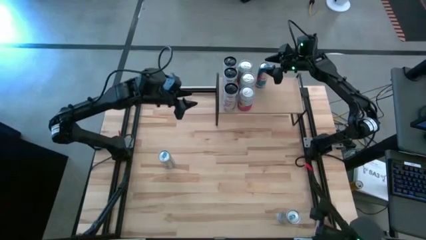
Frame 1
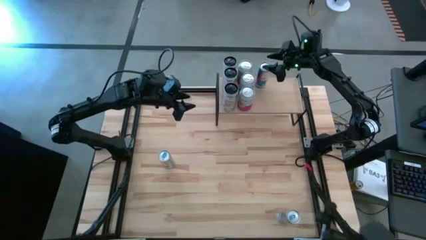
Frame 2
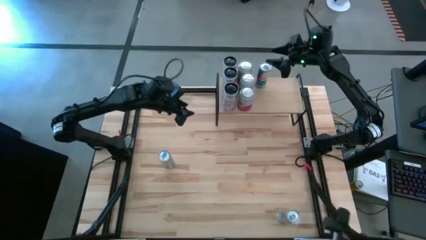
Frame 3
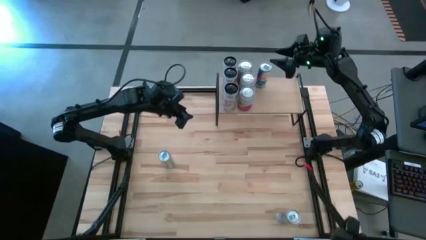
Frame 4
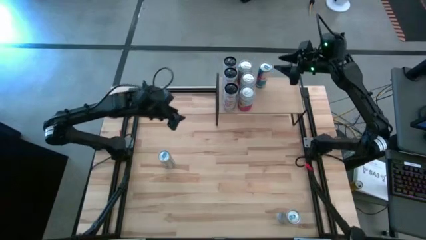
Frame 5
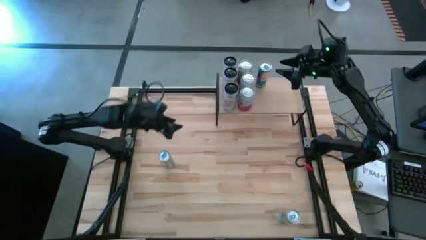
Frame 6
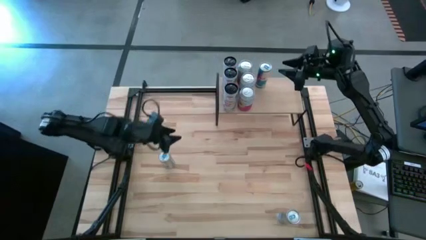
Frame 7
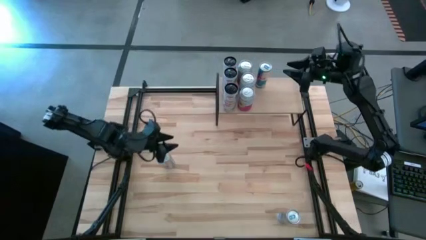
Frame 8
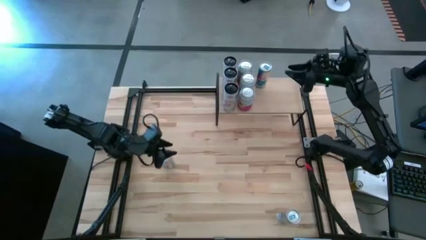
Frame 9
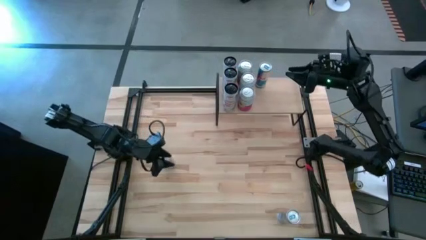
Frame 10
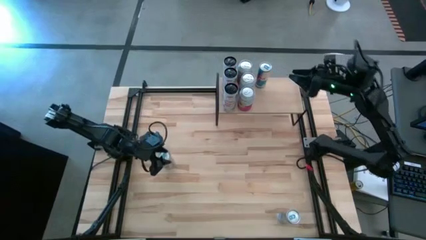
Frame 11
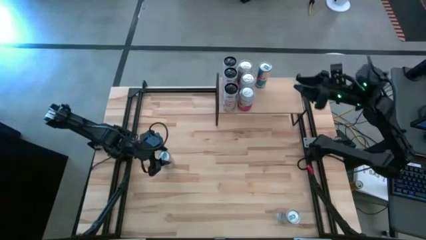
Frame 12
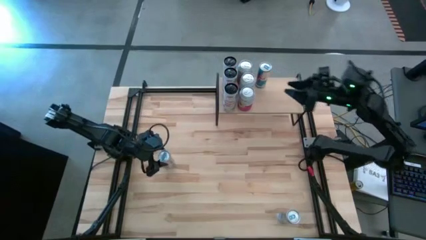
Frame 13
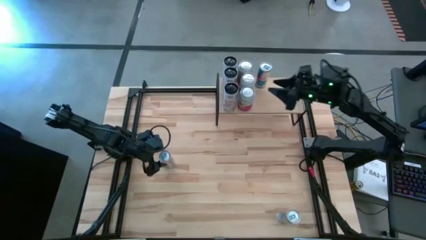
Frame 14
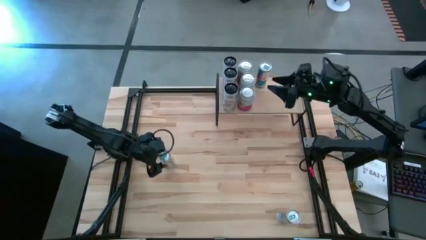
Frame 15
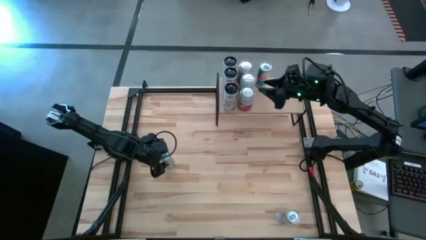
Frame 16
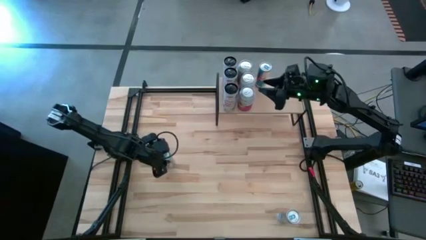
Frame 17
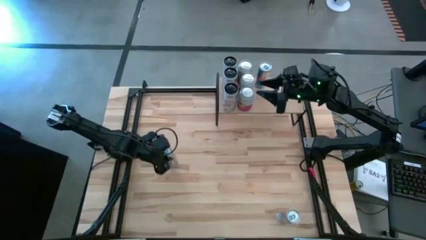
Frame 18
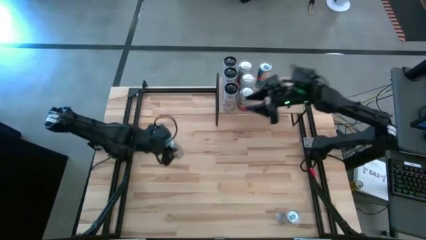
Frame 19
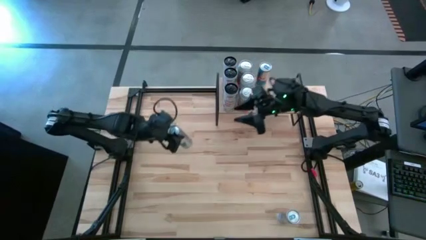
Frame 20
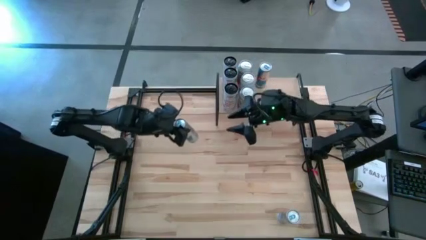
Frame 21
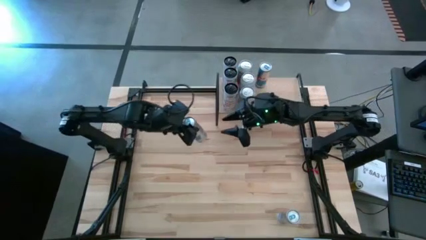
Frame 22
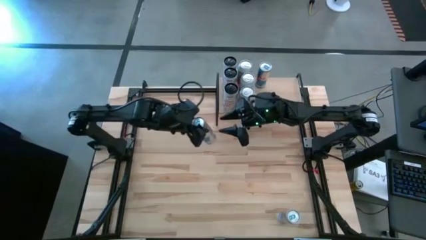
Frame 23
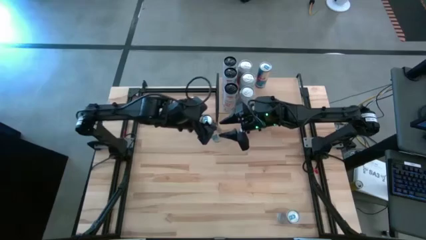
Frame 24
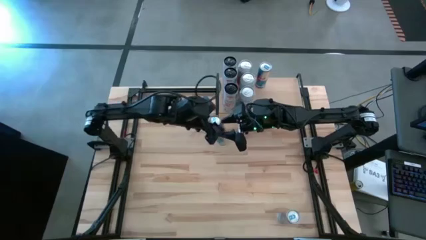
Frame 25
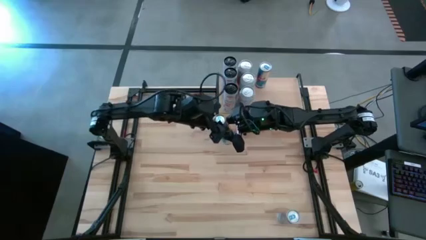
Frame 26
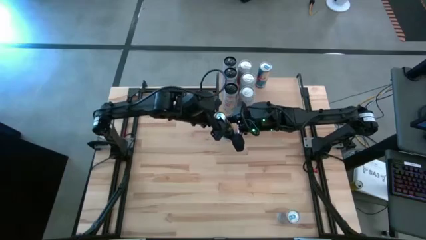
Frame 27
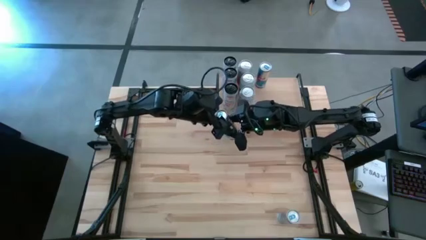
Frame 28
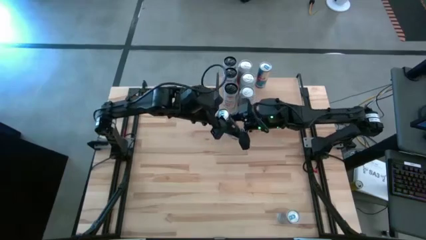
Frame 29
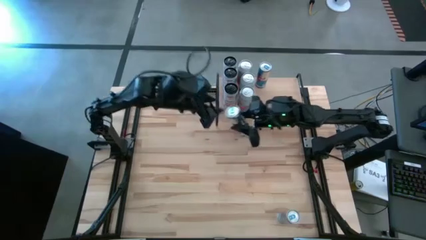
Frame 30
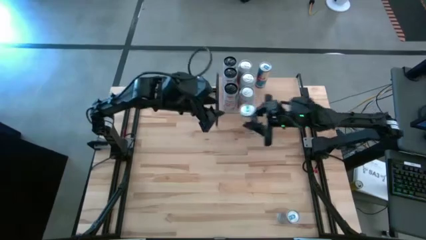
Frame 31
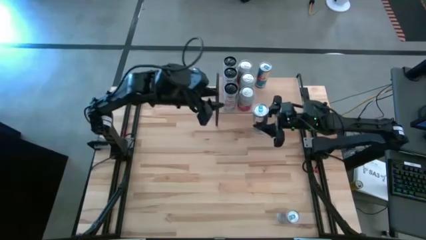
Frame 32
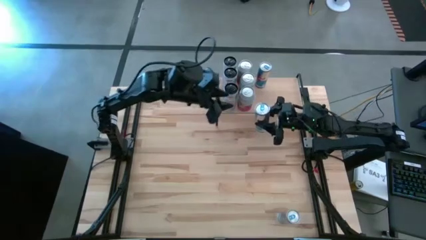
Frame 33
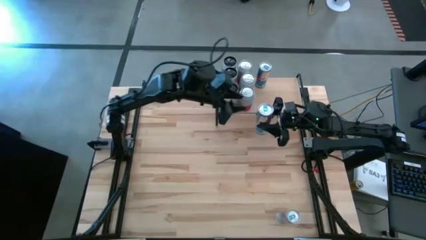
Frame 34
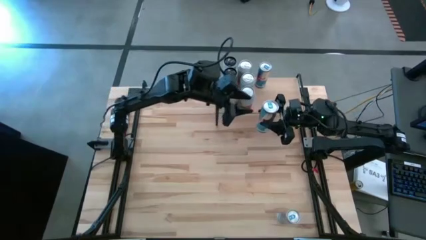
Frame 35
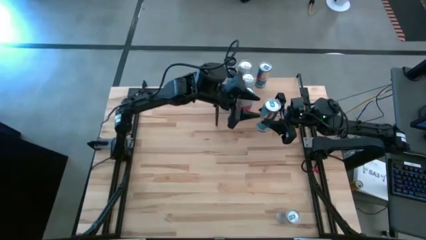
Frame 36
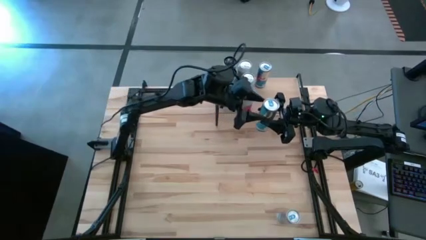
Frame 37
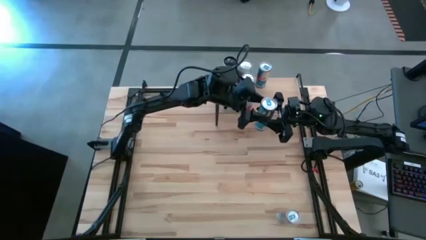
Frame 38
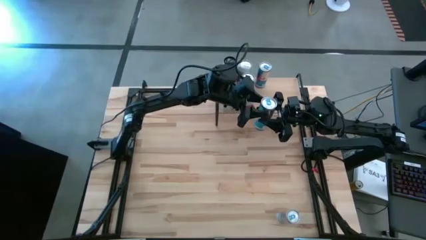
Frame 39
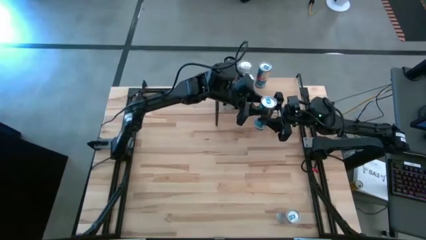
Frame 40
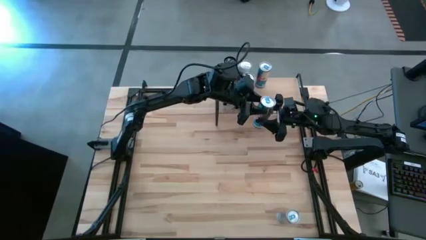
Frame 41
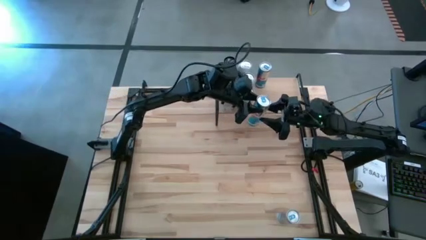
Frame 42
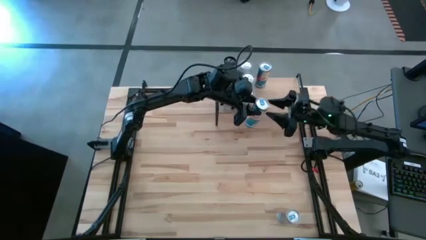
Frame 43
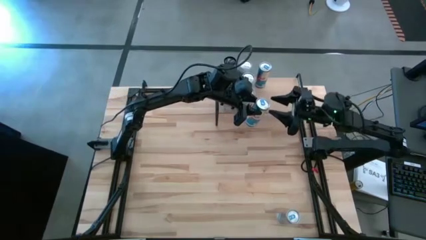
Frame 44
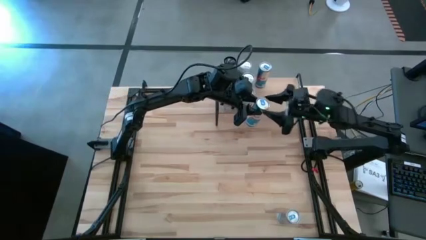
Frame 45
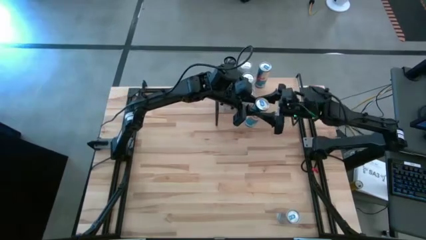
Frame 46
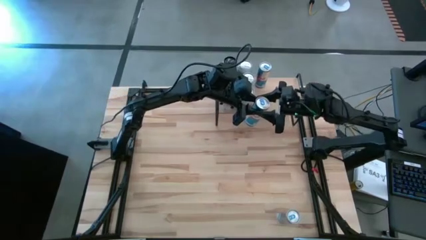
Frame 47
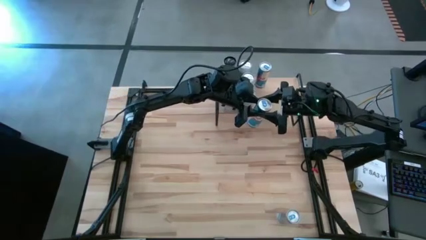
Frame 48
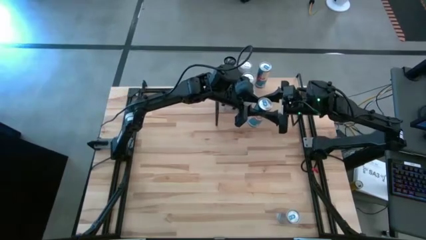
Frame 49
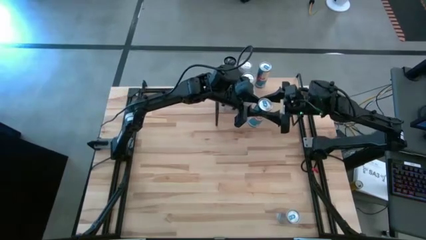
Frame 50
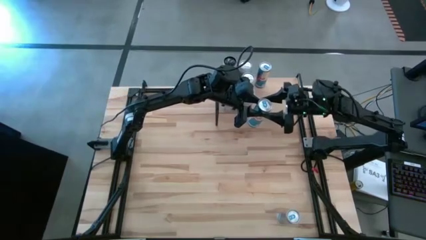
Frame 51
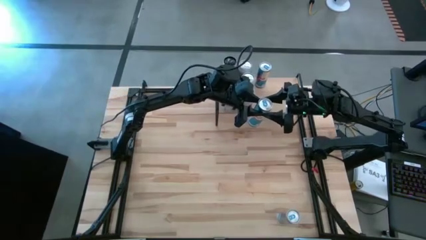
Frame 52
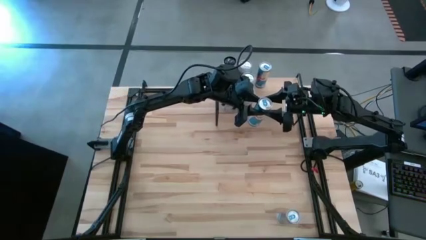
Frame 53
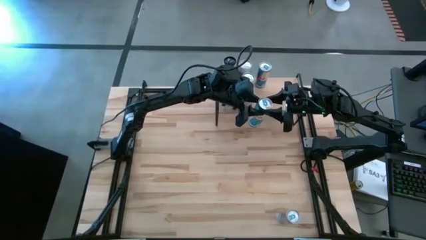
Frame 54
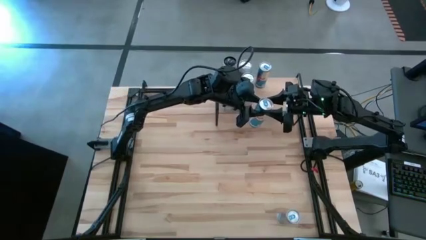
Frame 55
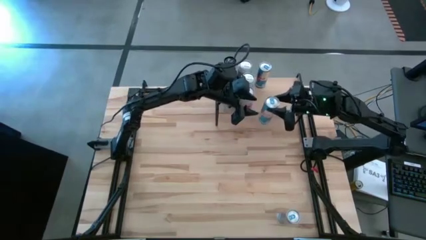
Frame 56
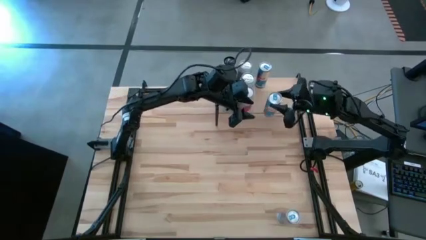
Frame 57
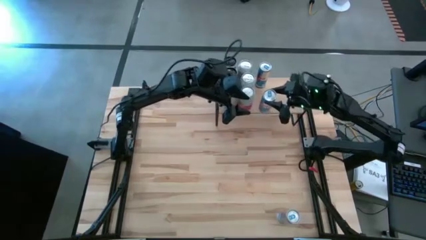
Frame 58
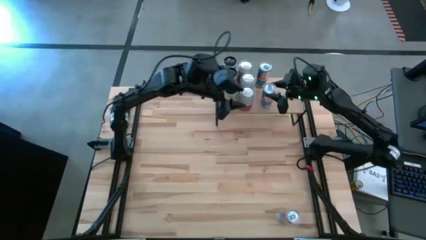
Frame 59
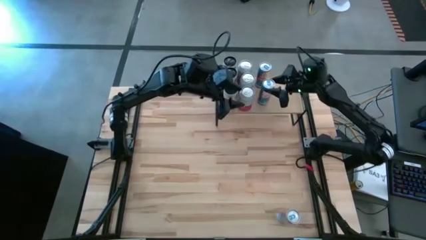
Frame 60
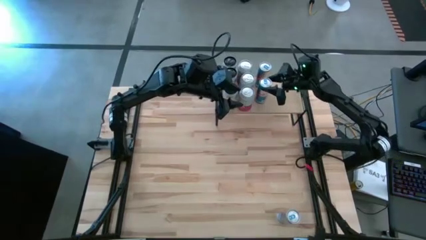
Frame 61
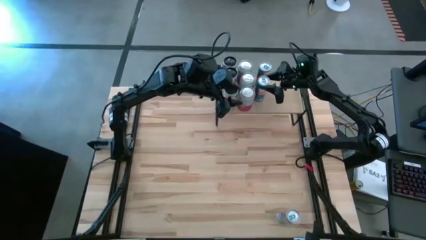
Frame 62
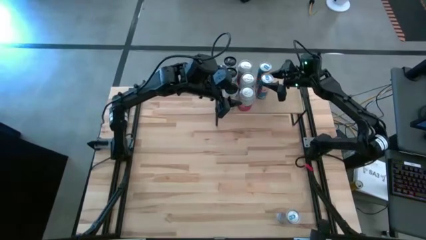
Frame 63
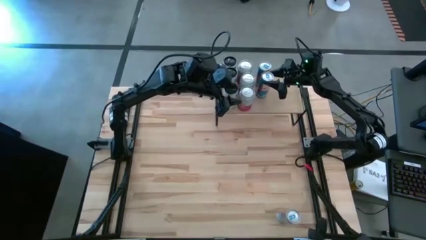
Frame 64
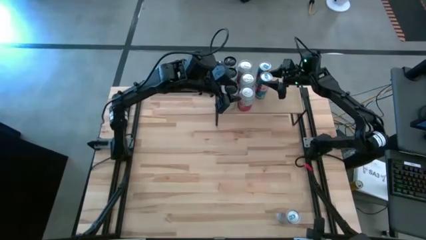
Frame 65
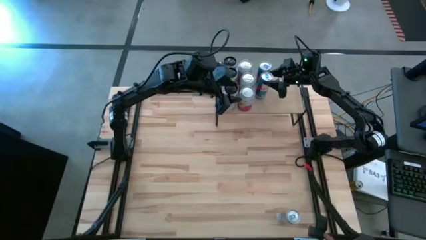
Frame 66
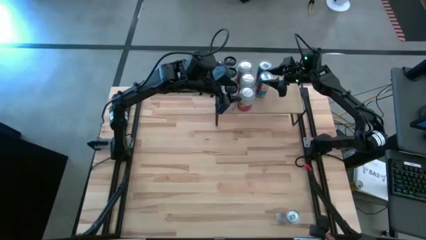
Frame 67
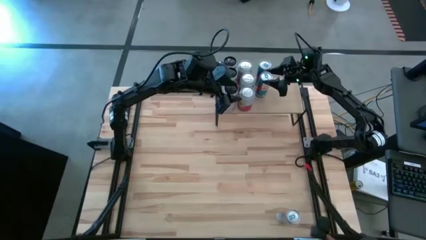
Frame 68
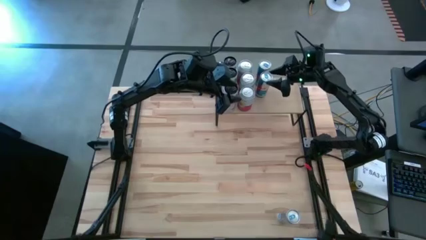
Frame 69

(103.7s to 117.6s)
Task: Place canned beverage on shelf
Put the top blue soda can aligned with the other blue soda can on the shelf
